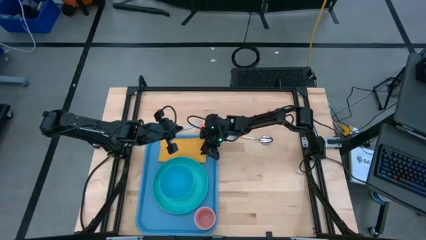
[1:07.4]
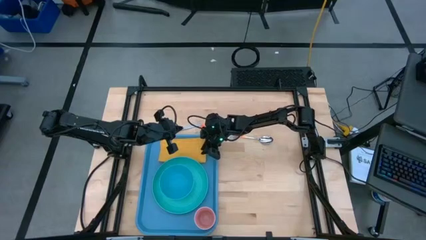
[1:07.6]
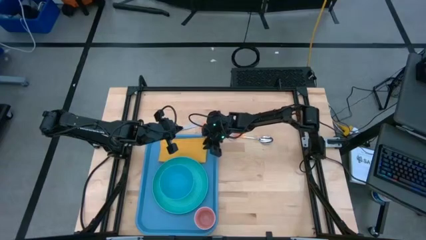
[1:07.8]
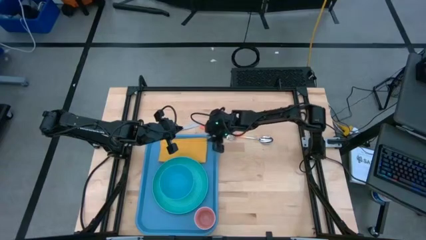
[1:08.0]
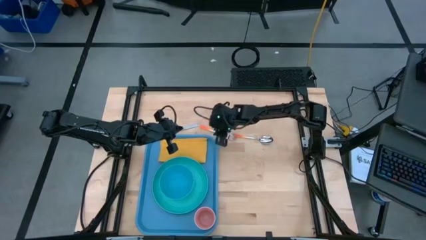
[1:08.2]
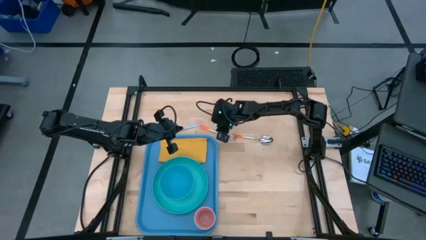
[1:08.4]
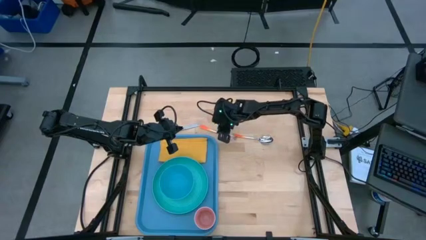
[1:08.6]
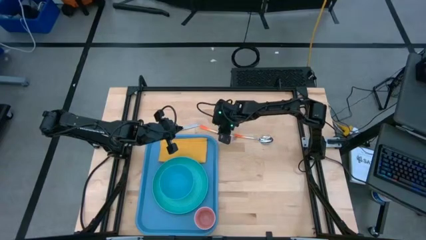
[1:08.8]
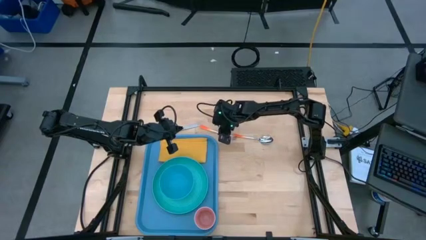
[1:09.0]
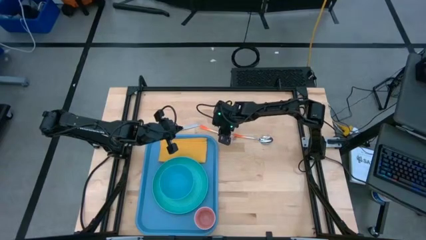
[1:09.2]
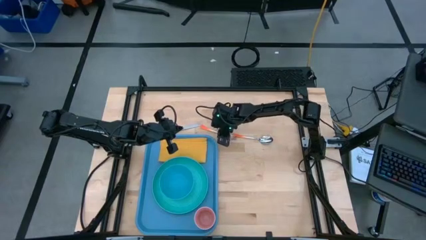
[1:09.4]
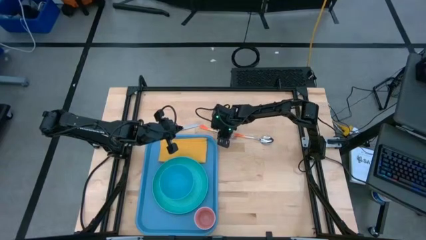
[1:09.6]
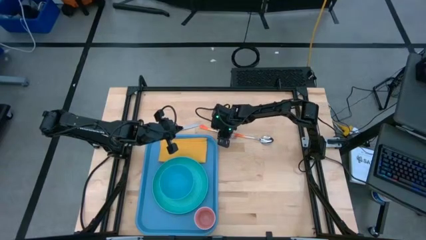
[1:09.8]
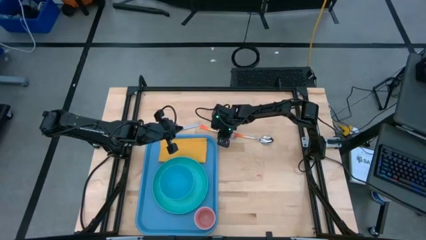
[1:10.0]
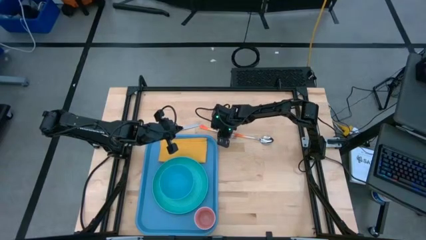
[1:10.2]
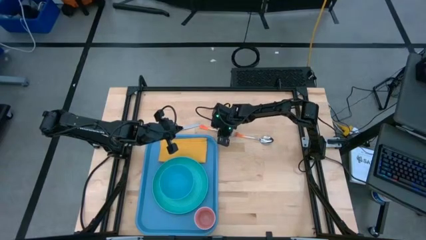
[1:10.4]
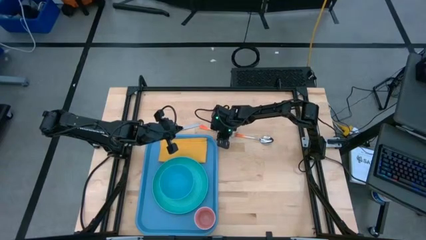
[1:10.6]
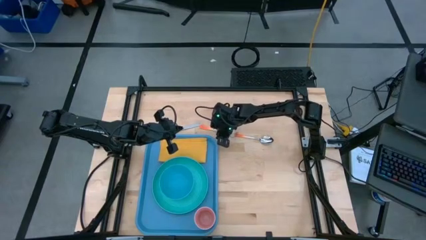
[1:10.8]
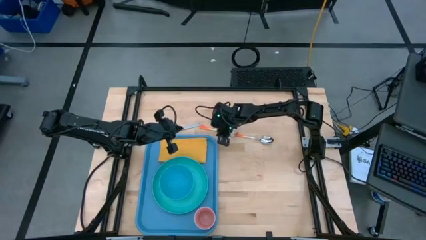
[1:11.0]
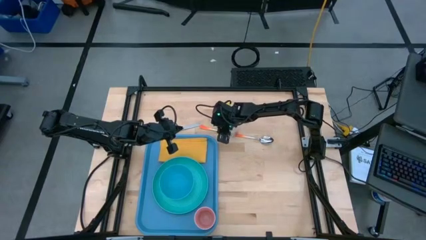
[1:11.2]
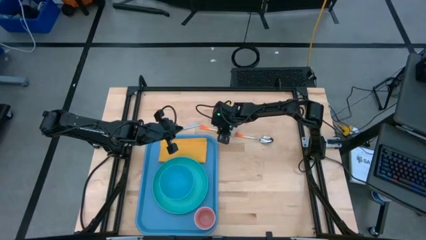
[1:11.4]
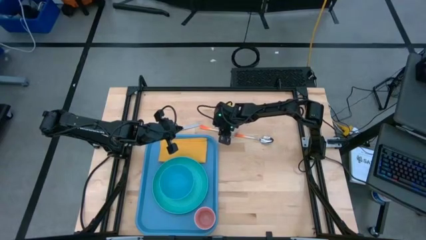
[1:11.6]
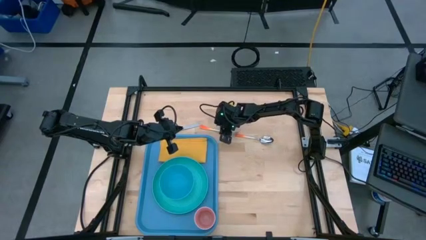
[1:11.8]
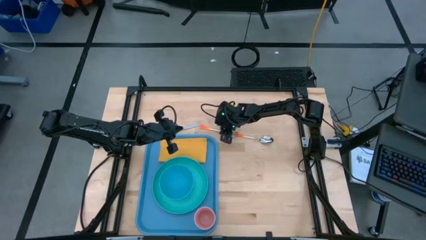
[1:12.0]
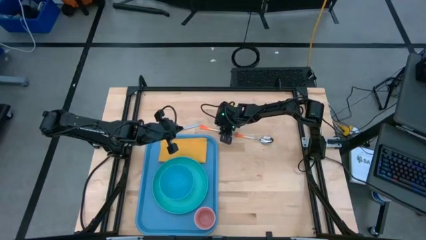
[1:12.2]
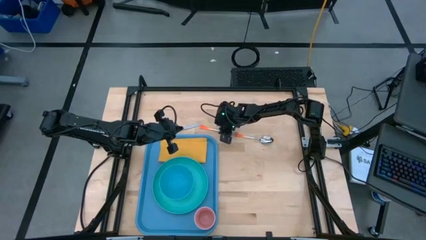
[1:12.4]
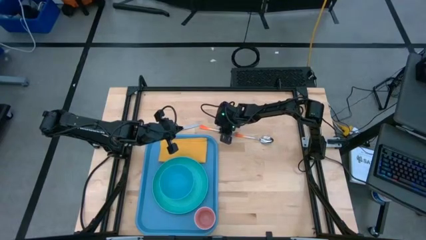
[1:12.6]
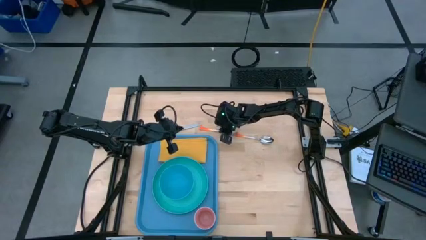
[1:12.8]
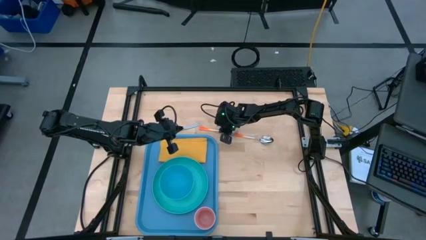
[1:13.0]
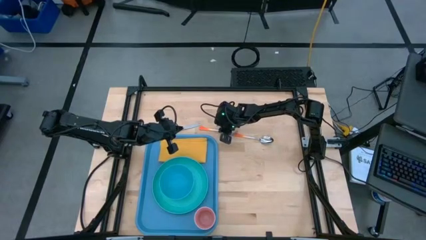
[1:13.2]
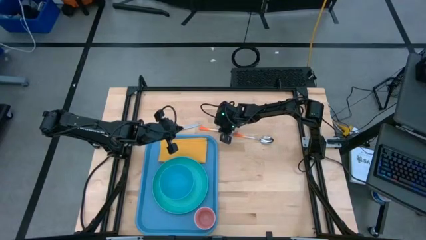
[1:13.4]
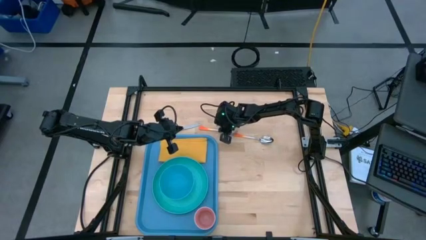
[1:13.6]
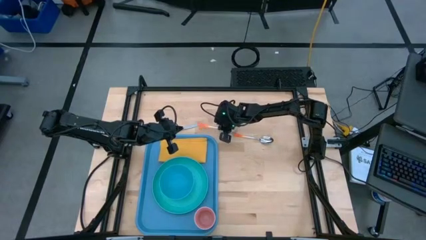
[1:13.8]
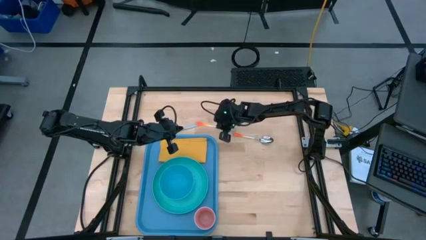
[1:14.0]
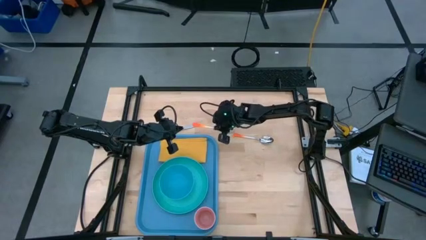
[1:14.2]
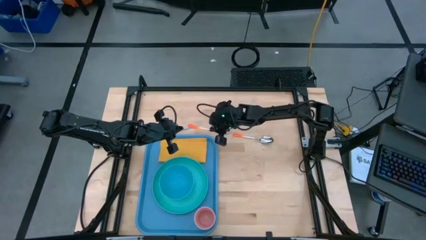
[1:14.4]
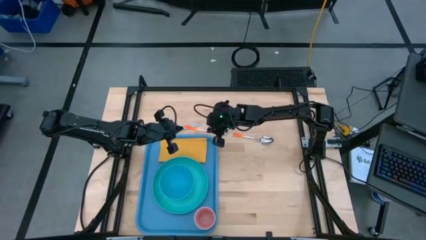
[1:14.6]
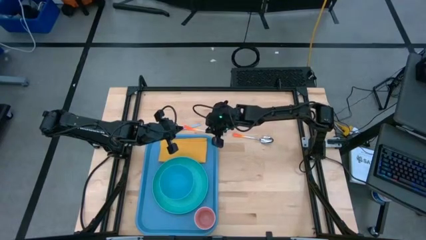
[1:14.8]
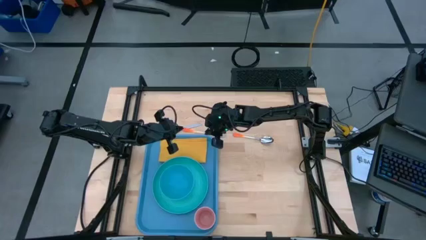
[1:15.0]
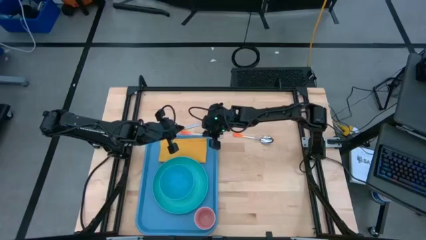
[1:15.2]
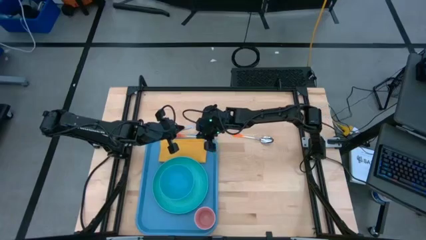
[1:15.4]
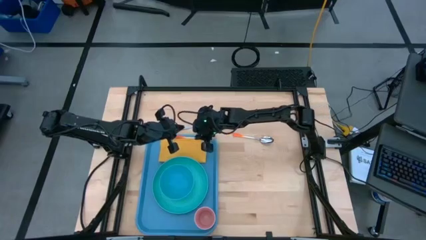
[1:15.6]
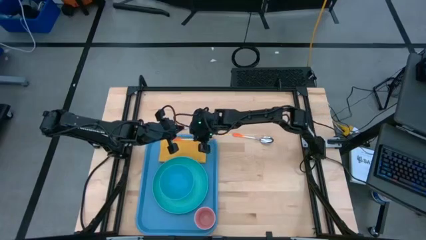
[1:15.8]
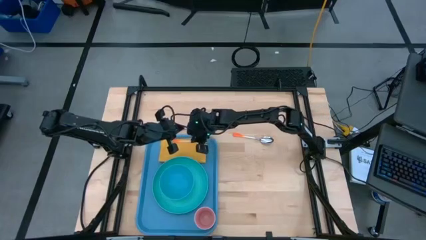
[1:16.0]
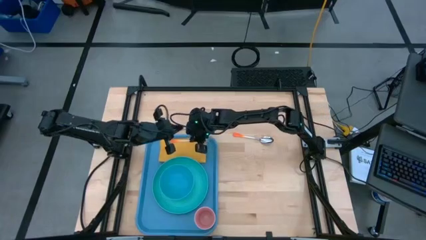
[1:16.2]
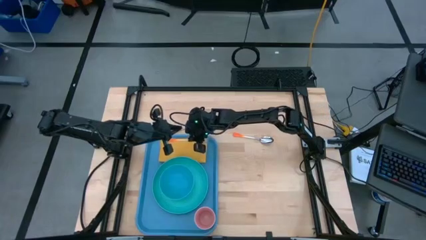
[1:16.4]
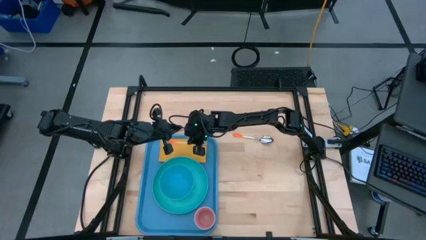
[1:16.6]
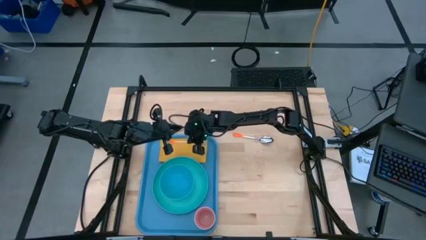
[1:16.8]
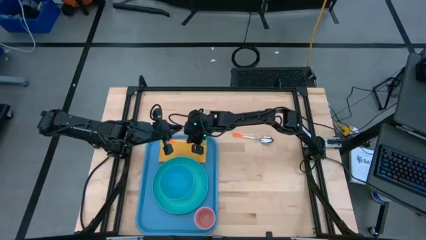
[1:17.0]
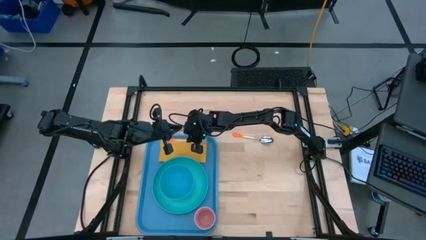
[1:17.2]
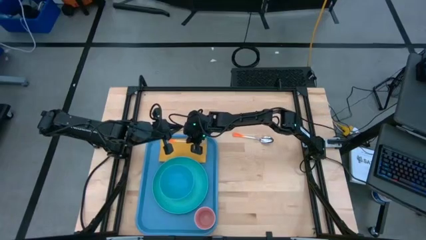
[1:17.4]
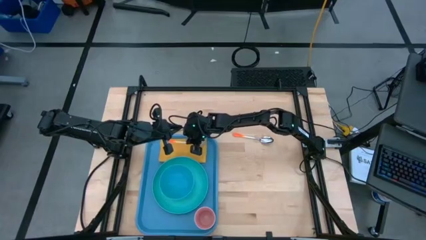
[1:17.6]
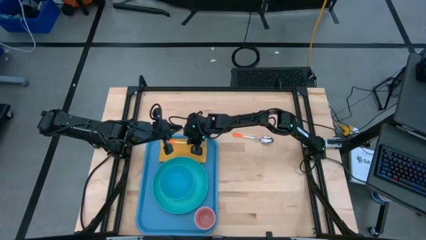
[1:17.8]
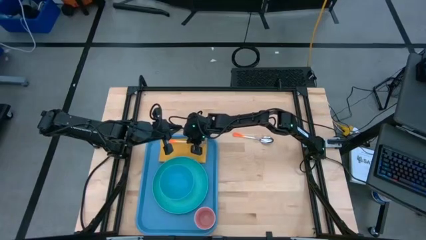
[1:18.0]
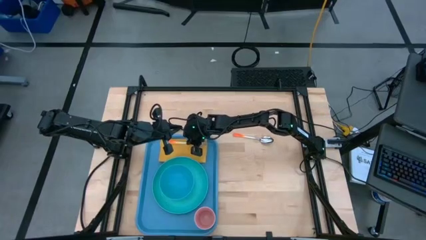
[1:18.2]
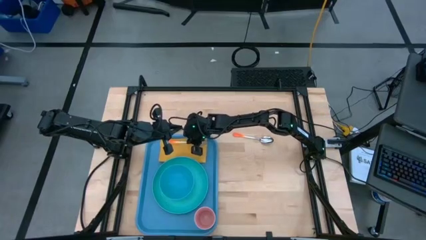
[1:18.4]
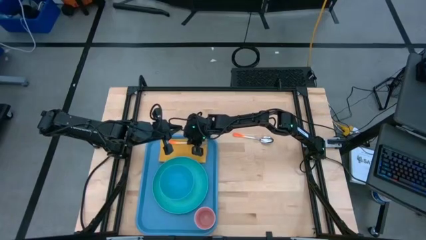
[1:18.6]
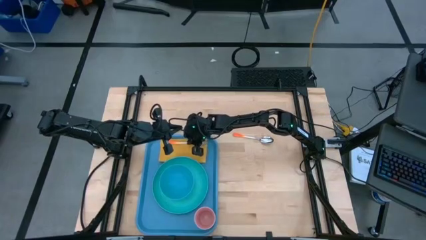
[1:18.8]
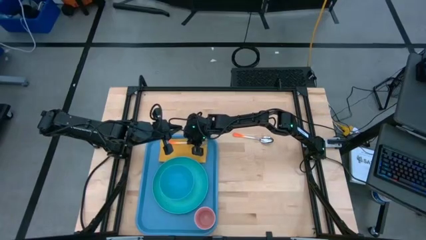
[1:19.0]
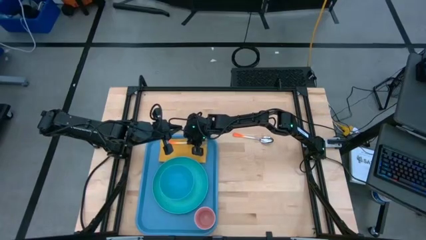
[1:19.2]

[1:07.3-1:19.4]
Task: Set up tray
Put the orange fork on the yellow napkin on the blue serving tray
